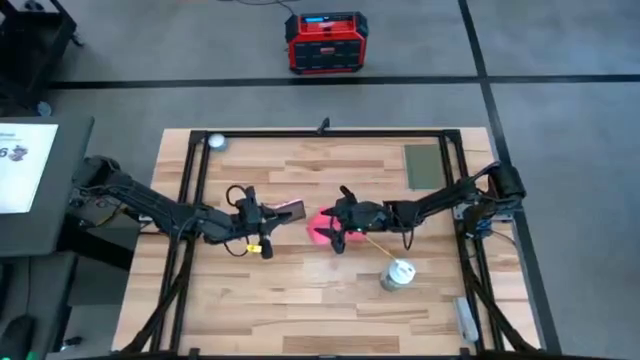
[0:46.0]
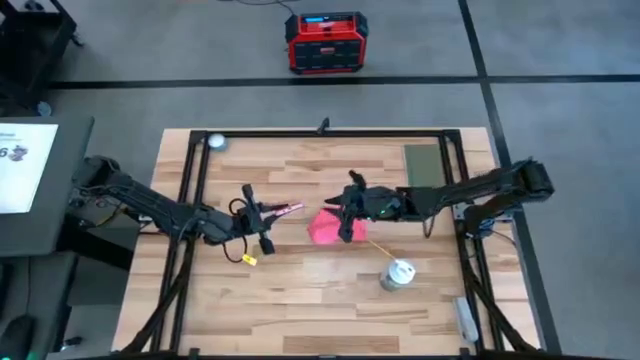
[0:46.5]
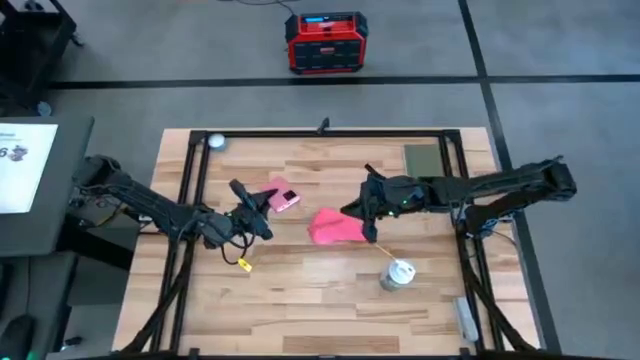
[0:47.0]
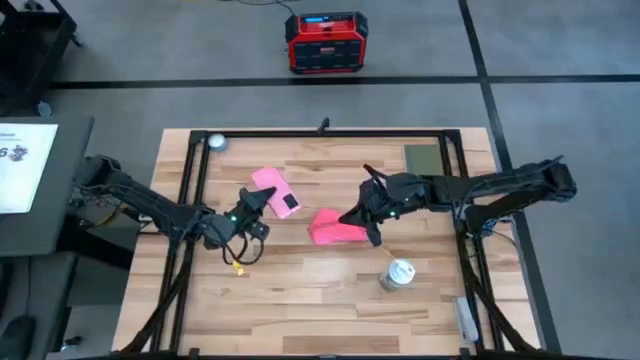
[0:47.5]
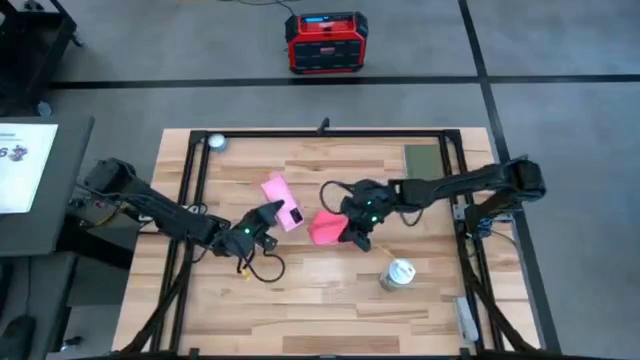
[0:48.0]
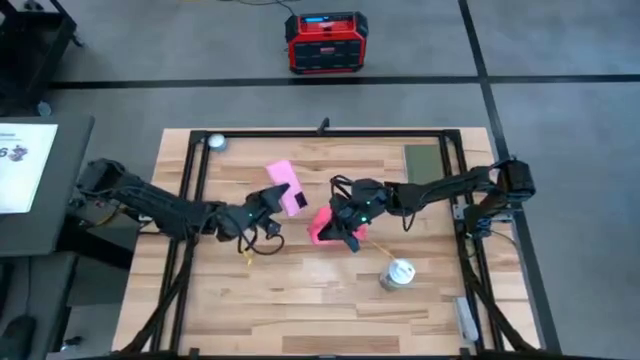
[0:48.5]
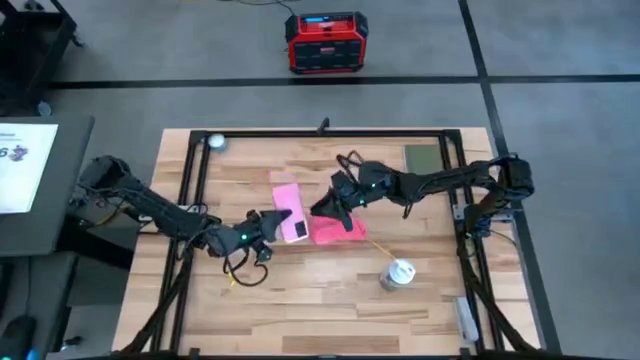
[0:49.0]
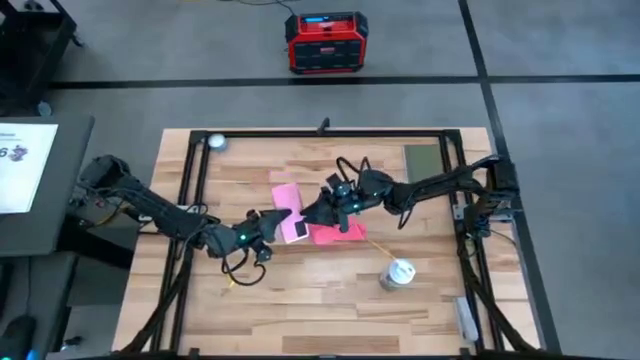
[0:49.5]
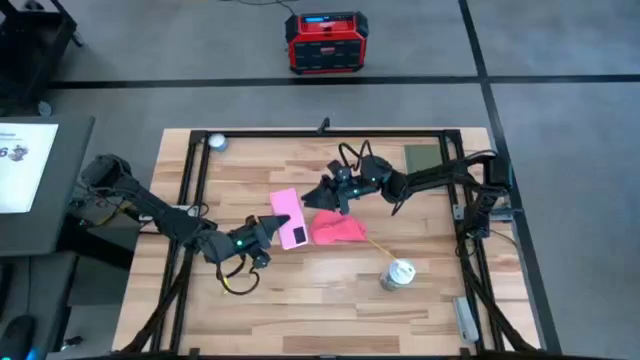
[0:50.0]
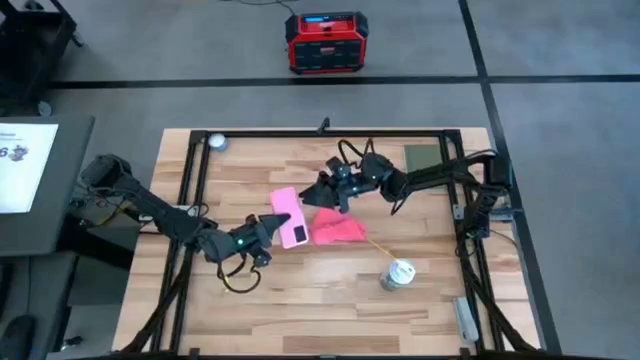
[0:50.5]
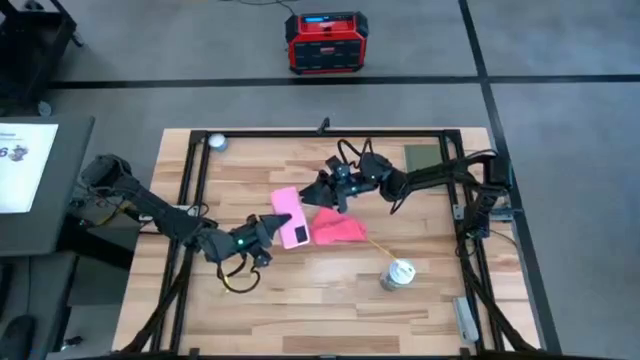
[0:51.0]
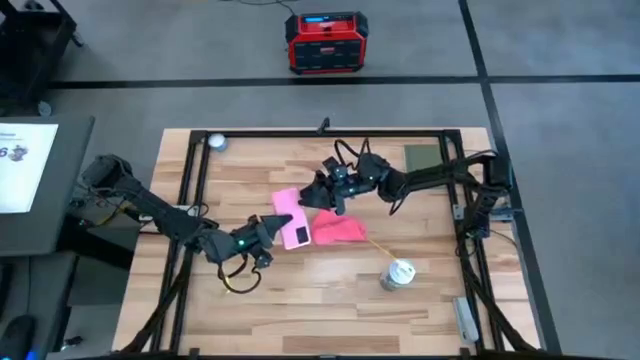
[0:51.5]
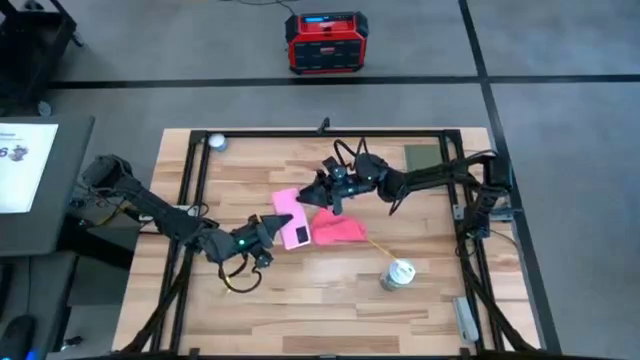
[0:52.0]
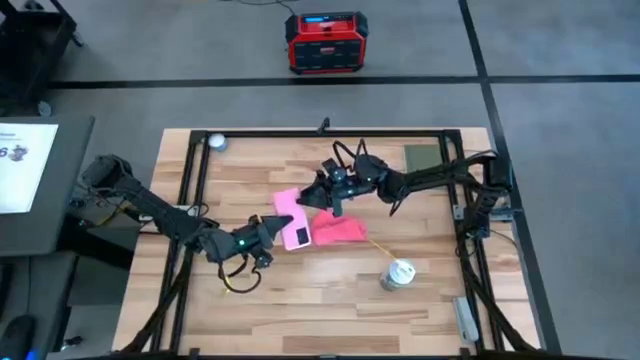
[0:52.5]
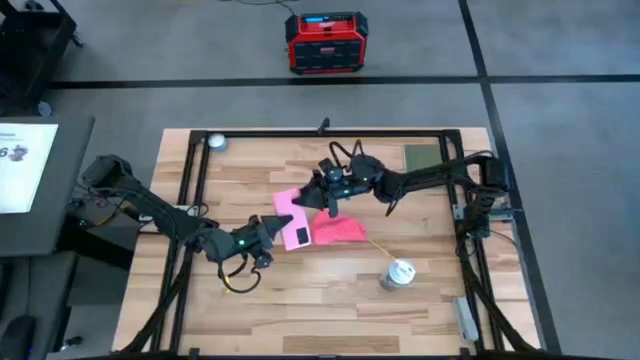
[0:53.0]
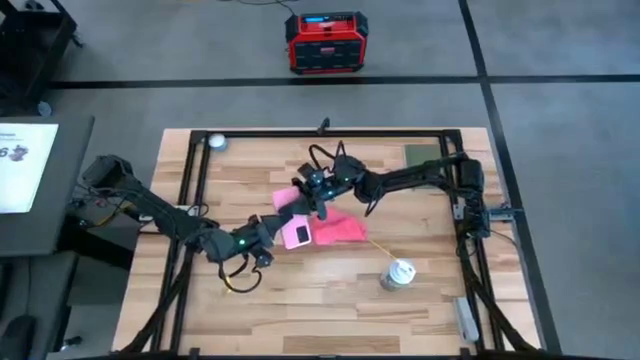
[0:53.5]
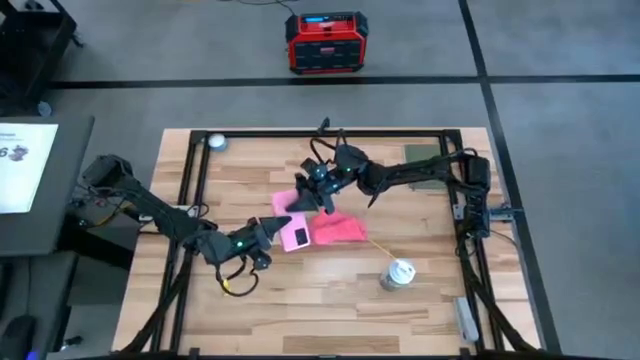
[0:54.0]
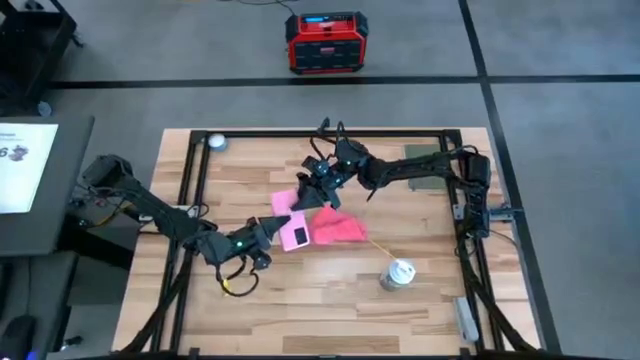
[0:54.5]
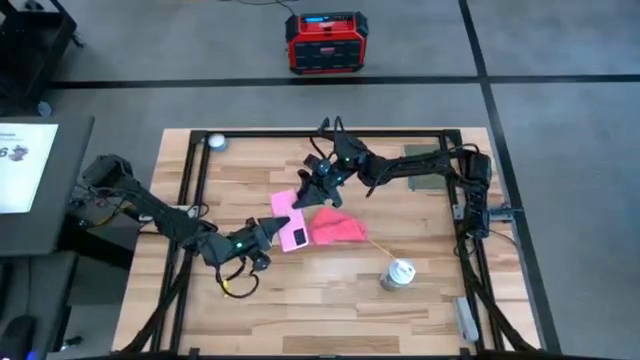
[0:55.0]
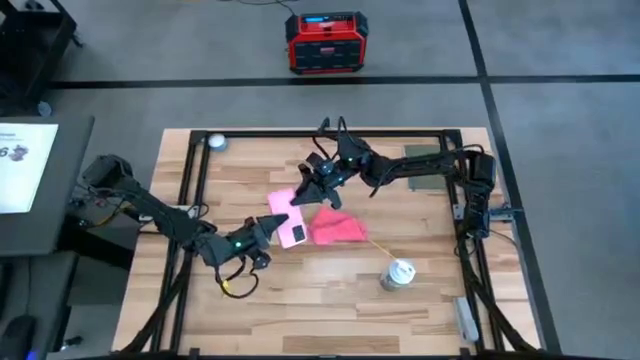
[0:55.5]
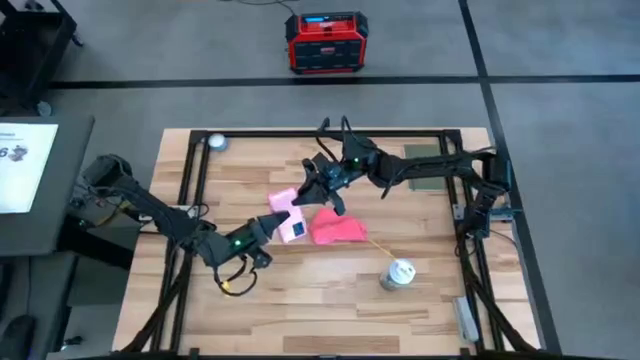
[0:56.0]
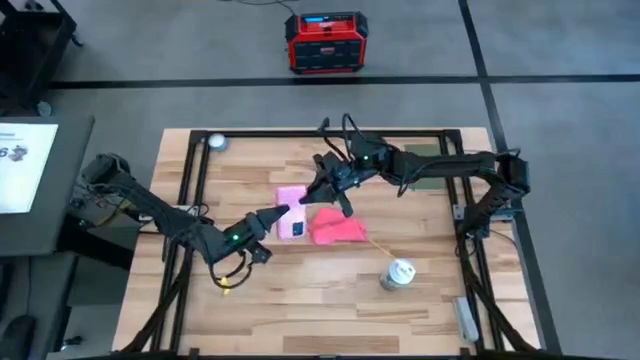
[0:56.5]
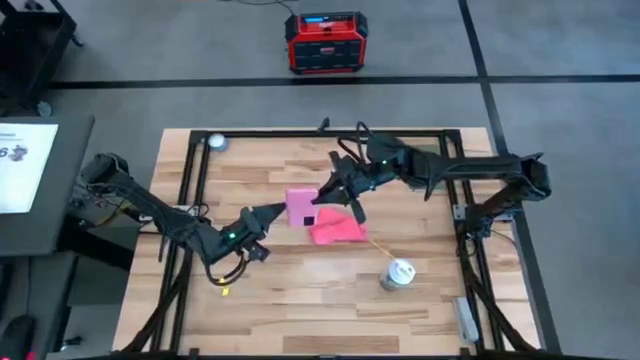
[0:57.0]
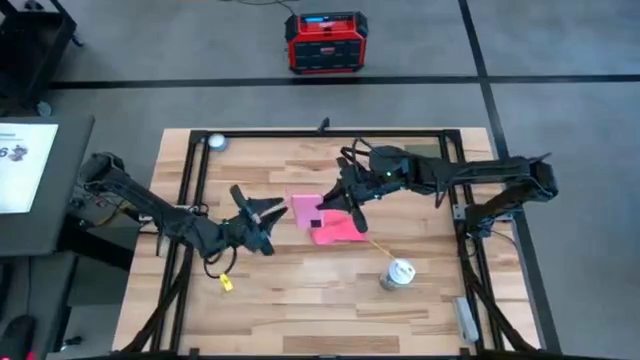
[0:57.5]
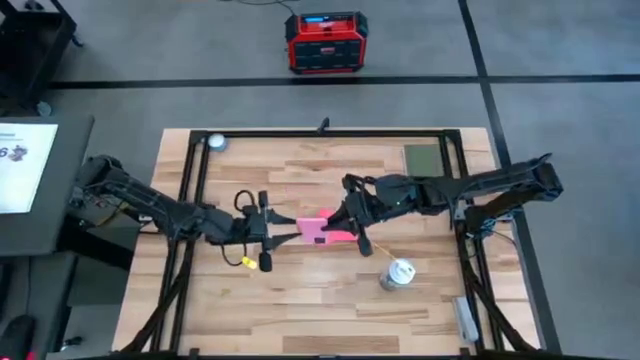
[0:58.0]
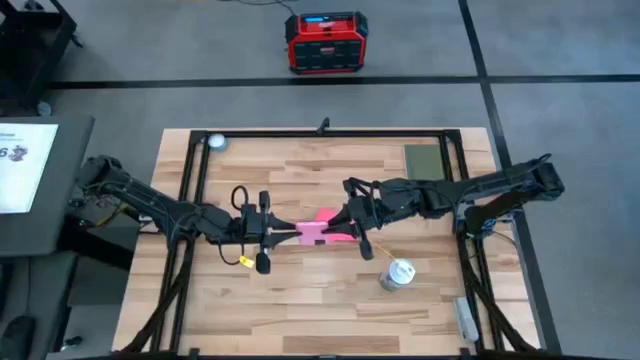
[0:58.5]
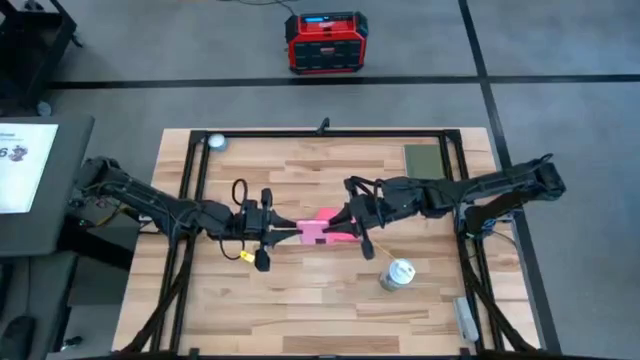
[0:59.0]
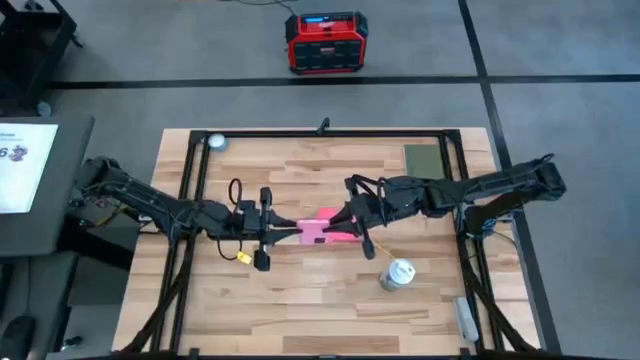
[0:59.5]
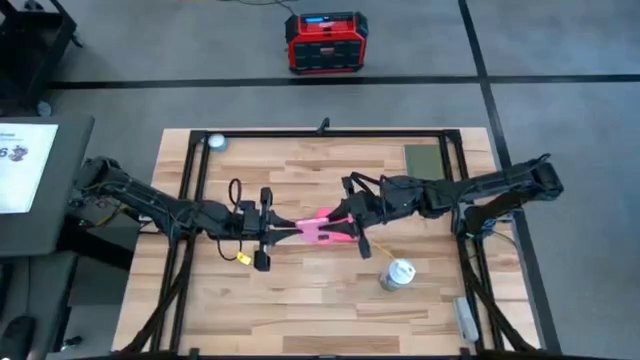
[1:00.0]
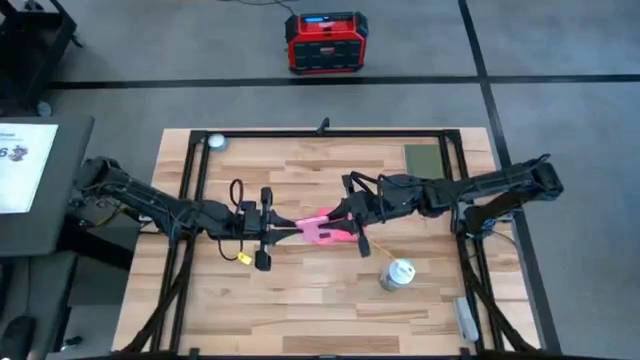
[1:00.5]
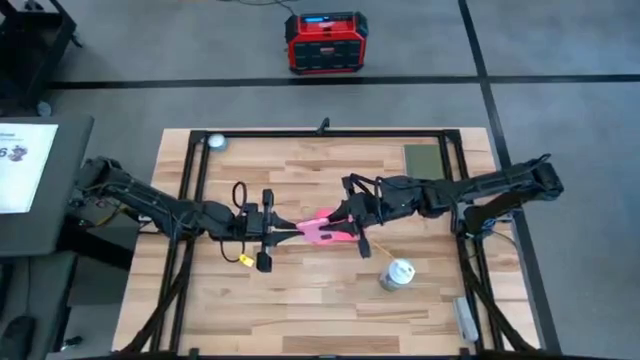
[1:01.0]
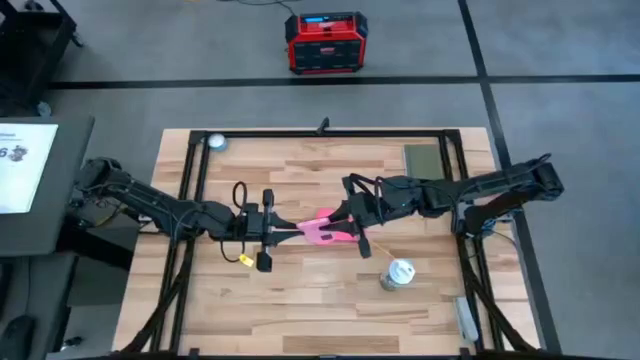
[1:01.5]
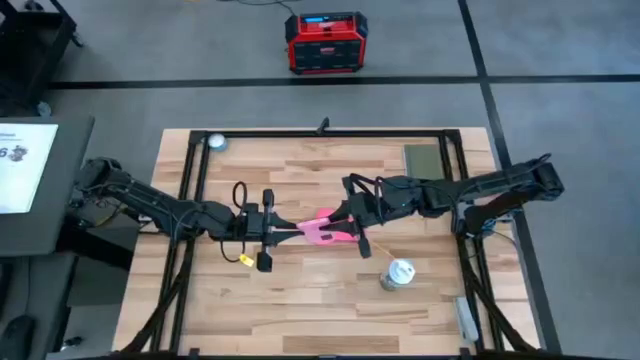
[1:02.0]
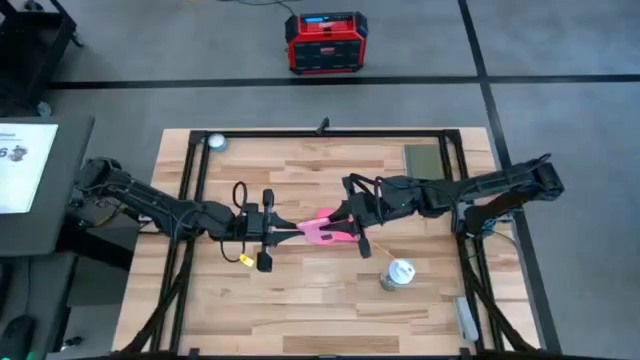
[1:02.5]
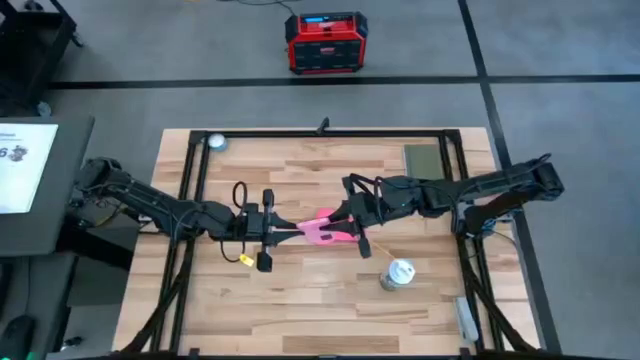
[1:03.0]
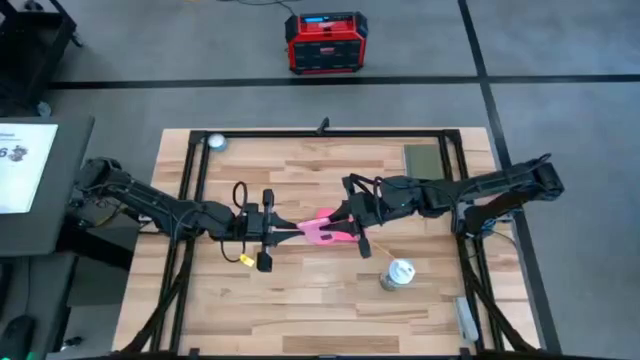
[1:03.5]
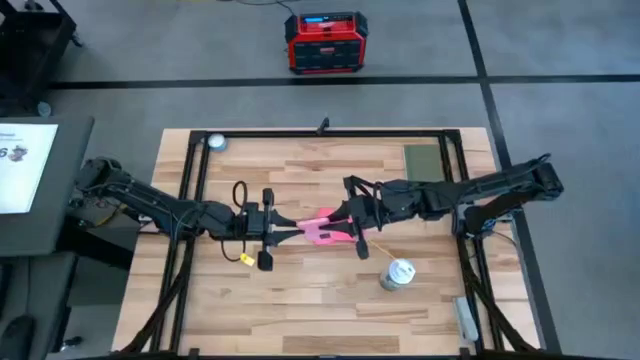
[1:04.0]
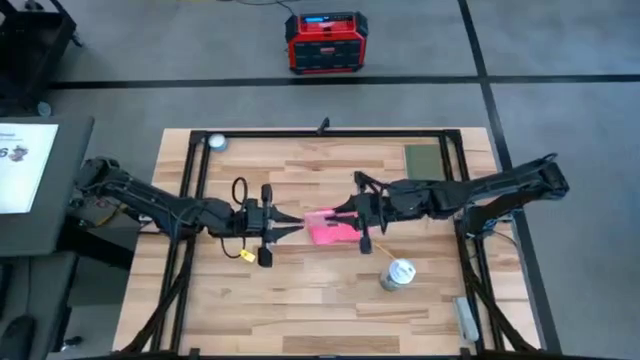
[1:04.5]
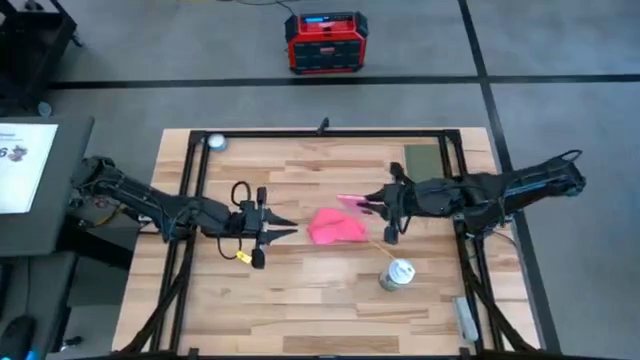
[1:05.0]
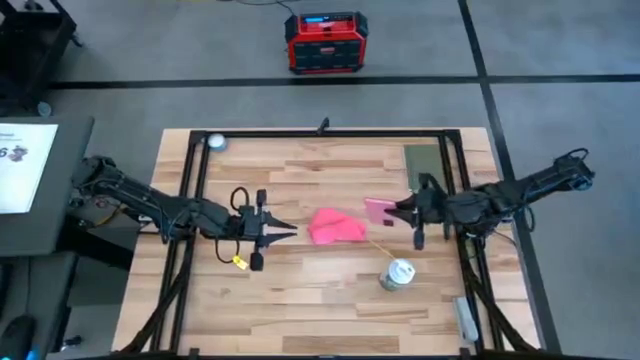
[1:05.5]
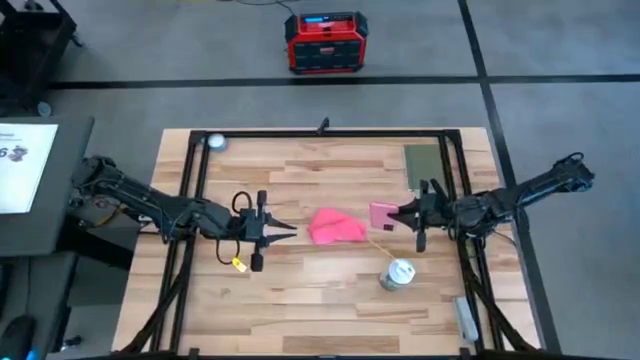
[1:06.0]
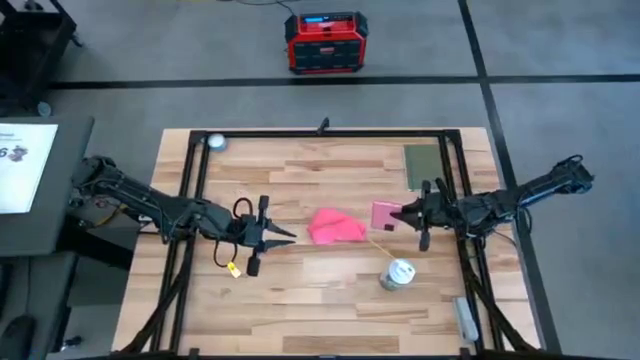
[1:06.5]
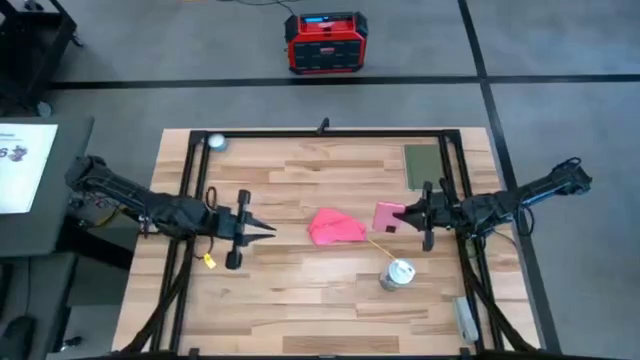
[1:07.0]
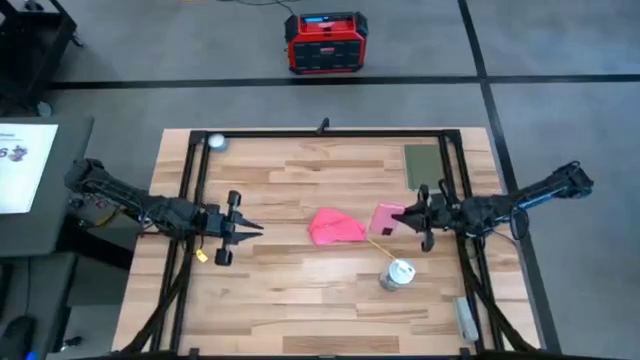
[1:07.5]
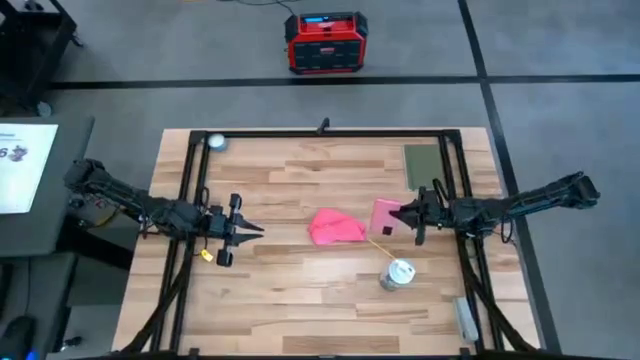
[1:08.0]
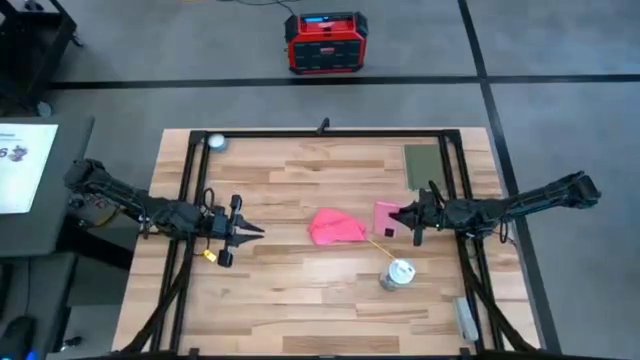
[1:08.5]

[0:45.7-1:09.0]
Task: Apply microfiber cloth
Spray the back of the pink phone using the spray bottle
